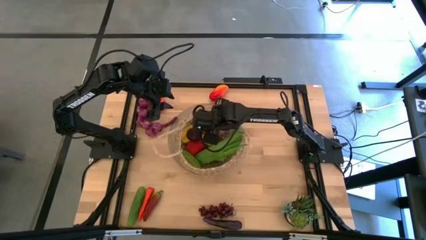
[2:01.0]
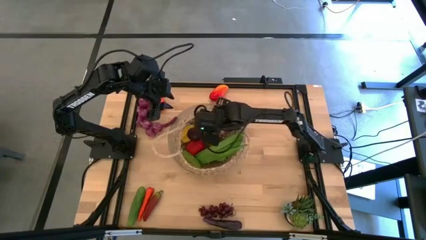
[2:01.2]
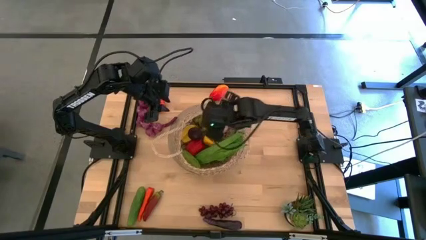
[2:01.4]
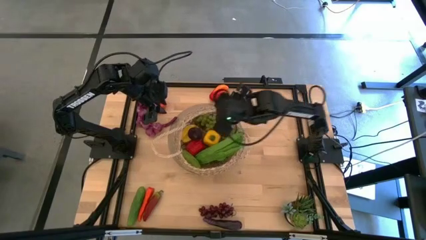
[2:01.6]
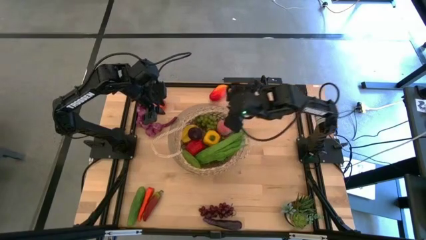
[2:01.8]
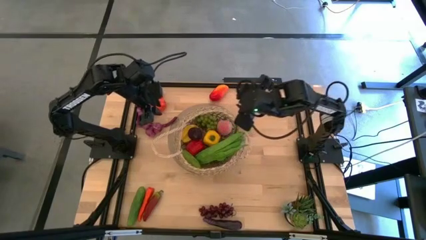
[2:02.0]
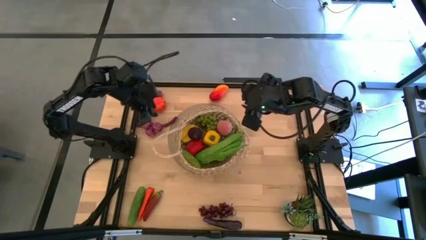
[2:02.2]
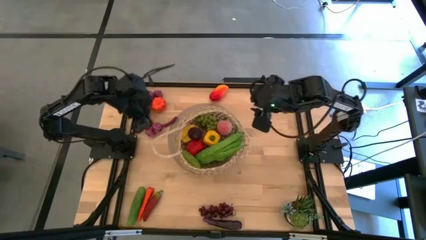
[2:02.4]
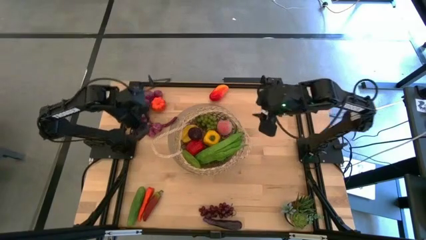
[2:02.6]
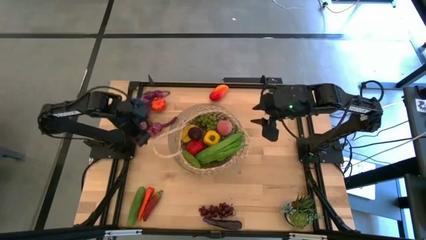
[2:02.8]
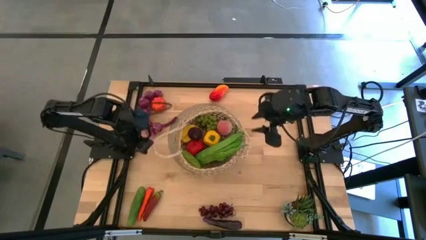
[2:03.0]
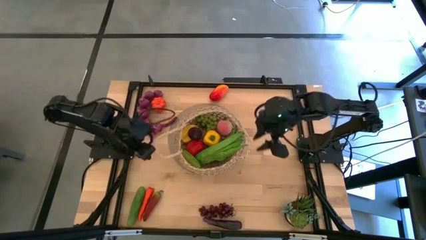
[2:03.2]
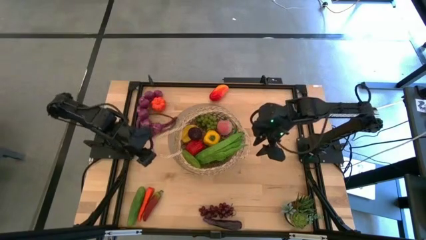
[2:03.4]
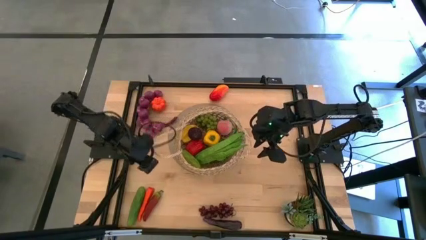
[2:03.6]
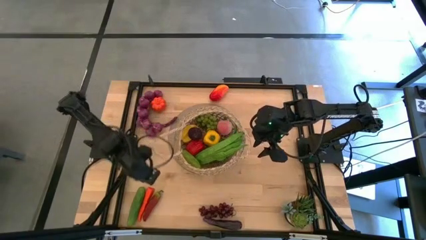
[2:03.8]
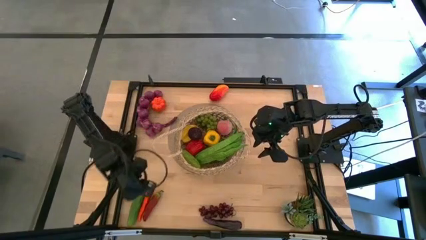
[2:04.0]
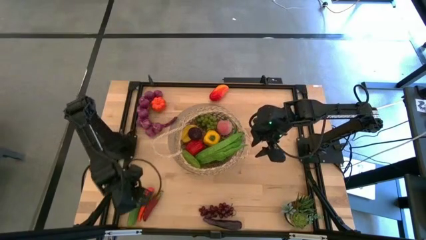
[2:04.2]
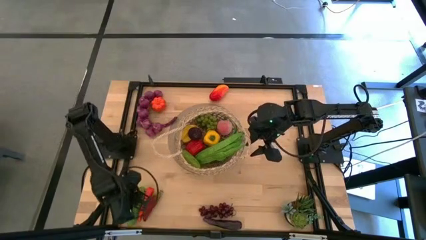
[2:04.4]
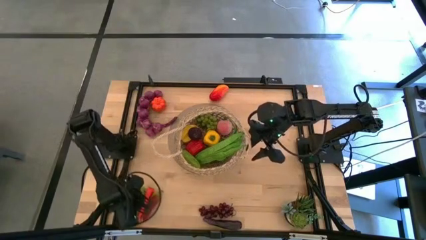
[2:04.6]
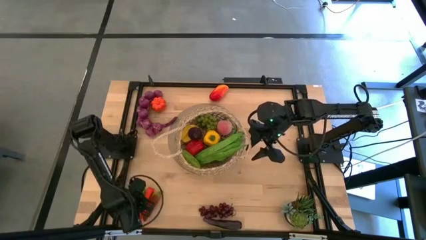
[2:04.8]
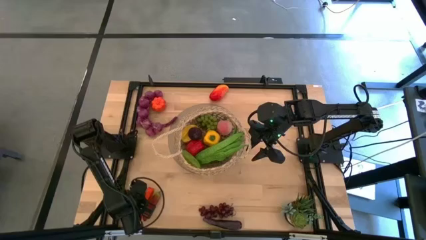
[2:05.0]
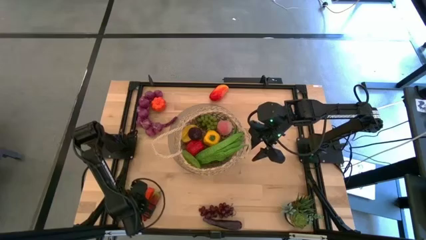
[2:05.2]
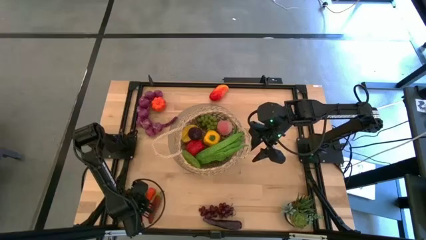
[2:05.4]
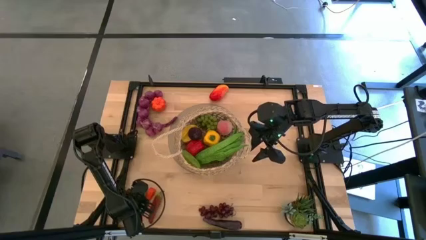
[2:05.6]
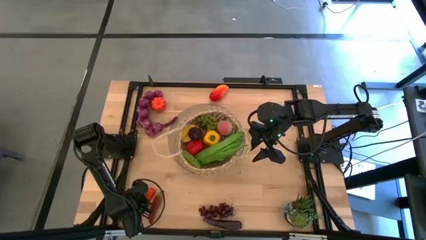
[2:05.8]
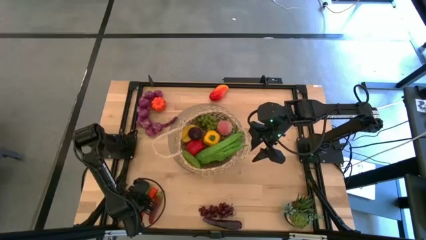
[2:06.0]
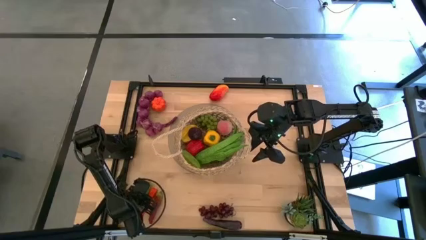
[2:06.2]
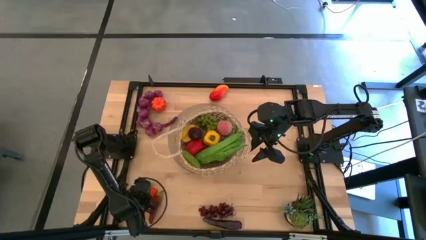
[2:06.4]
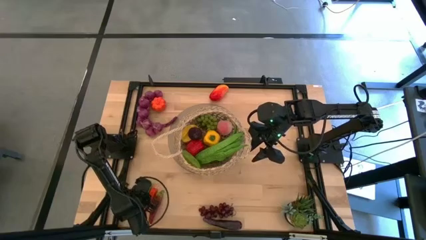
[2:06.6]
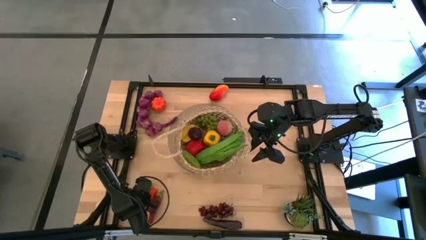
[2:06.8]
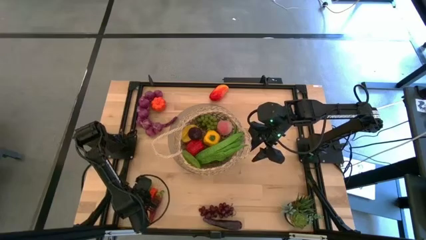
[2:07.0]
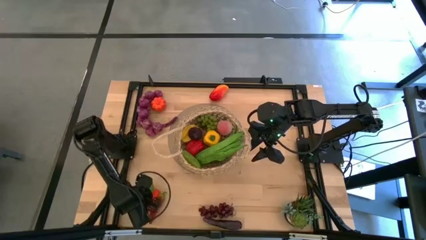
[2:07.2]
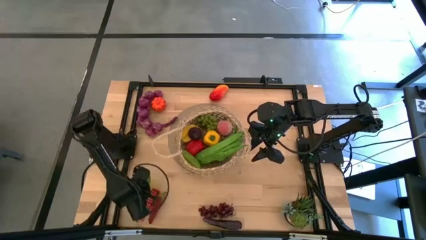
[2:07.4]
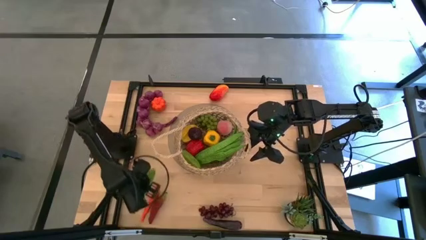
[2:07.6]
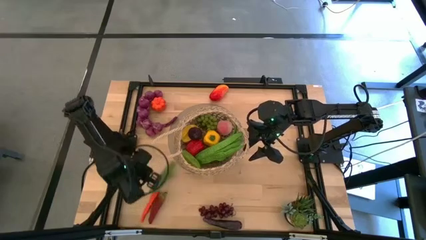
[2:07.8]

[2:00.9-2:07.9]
Task: Build produce basket
Put the green cucumber into the brown basket

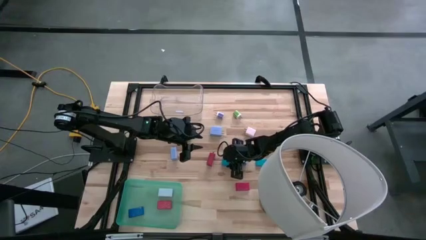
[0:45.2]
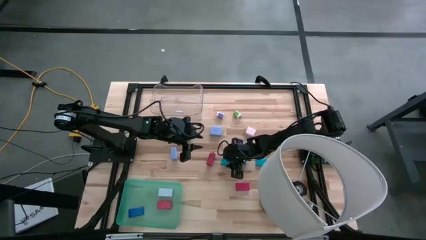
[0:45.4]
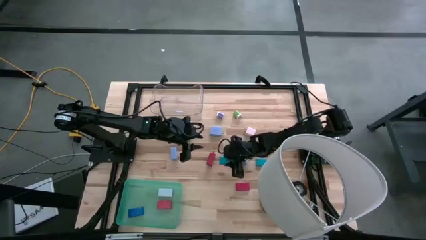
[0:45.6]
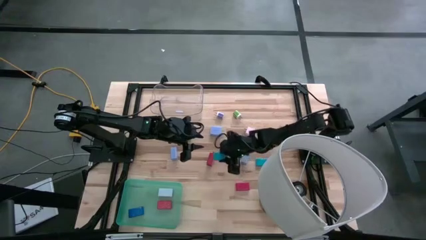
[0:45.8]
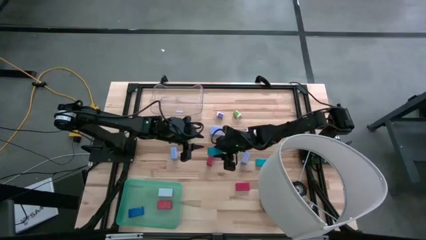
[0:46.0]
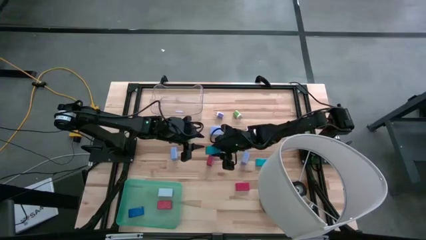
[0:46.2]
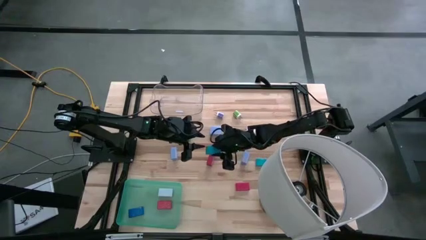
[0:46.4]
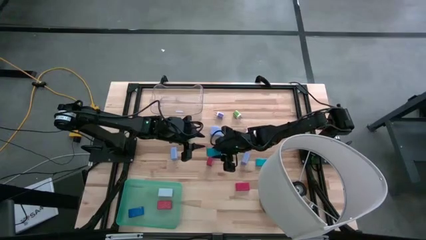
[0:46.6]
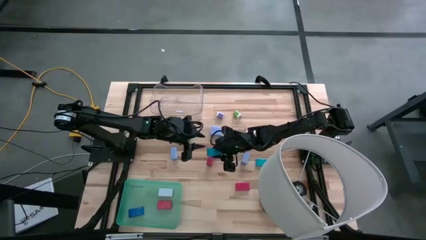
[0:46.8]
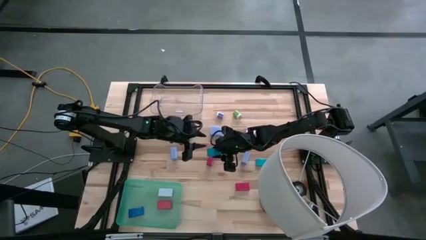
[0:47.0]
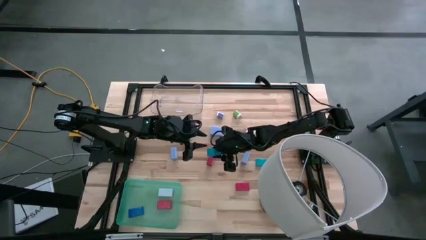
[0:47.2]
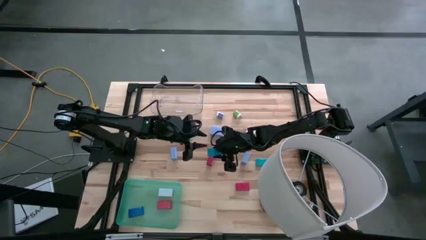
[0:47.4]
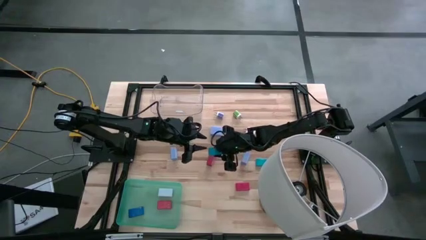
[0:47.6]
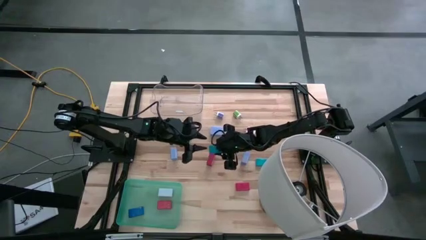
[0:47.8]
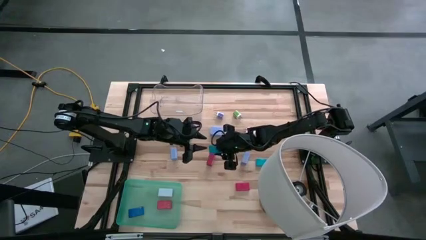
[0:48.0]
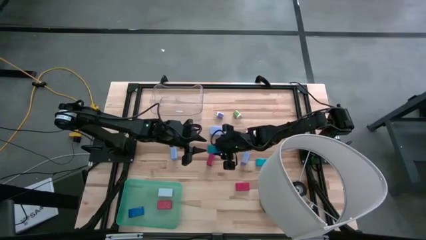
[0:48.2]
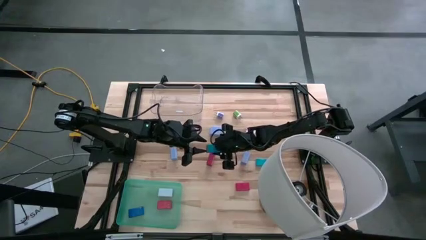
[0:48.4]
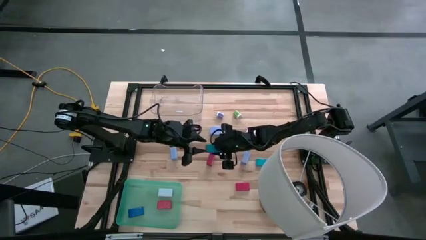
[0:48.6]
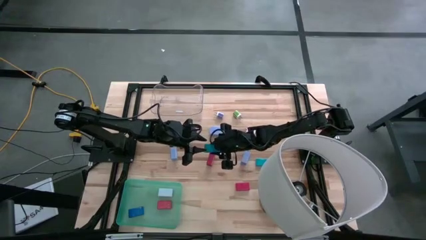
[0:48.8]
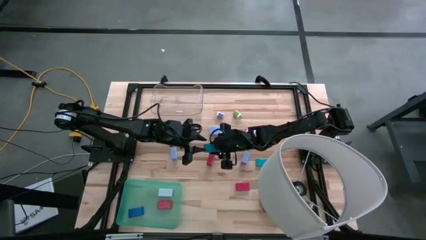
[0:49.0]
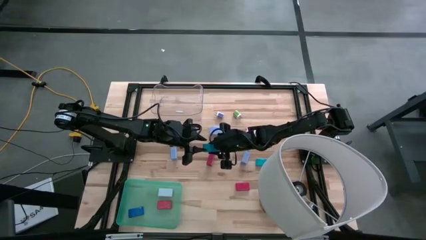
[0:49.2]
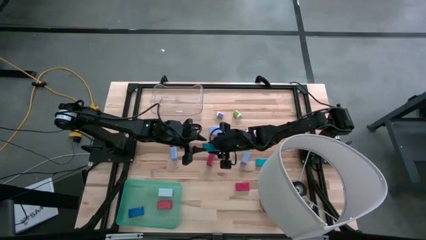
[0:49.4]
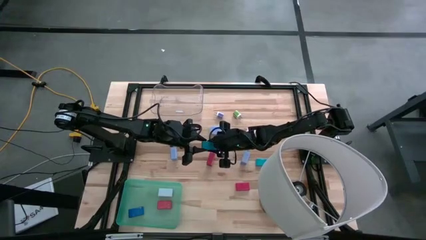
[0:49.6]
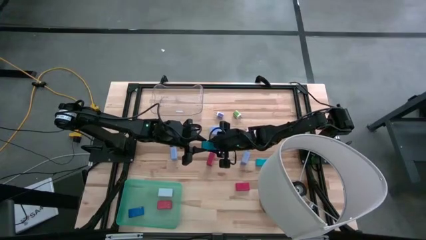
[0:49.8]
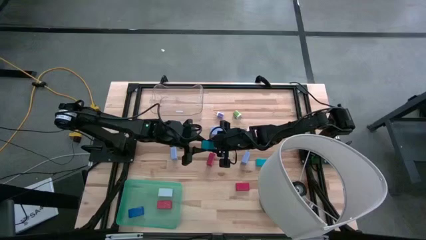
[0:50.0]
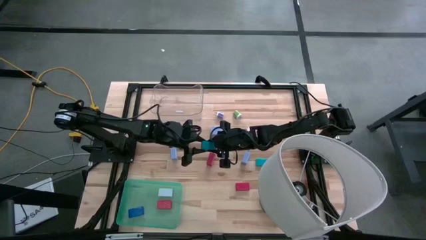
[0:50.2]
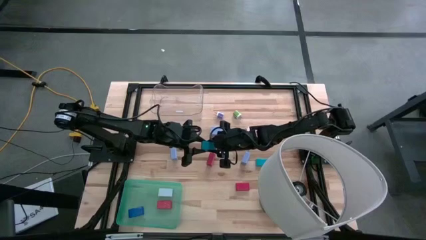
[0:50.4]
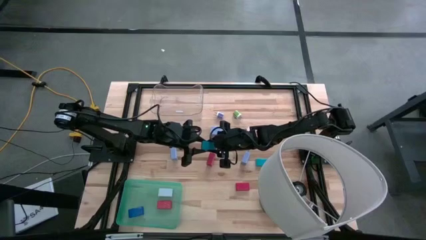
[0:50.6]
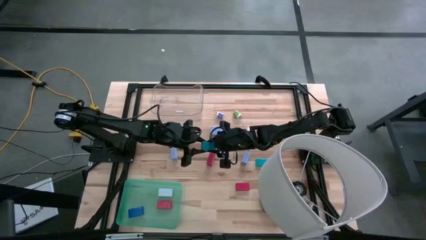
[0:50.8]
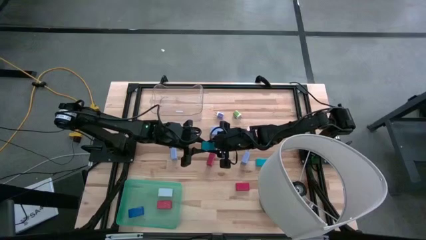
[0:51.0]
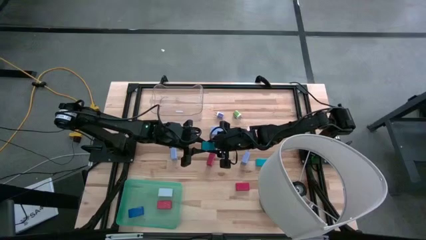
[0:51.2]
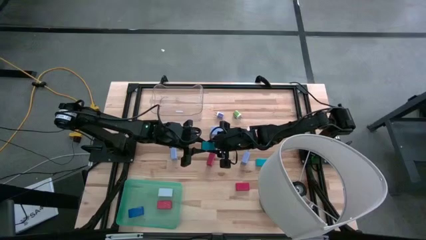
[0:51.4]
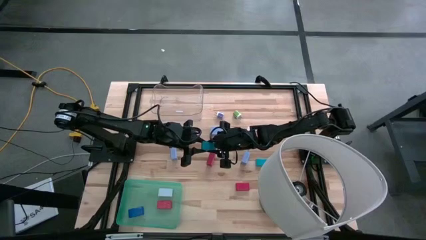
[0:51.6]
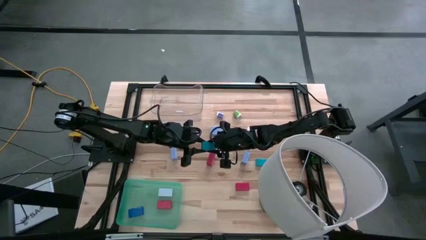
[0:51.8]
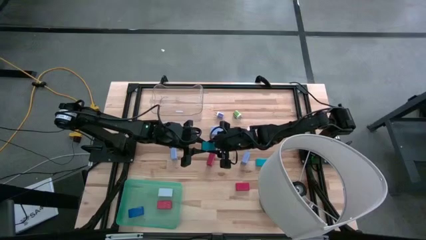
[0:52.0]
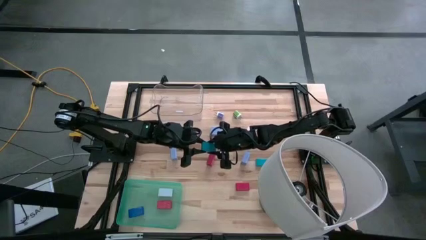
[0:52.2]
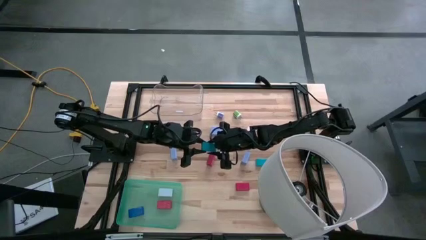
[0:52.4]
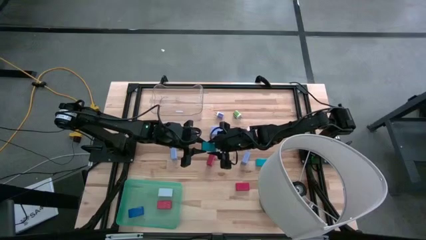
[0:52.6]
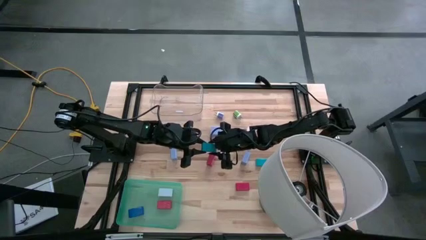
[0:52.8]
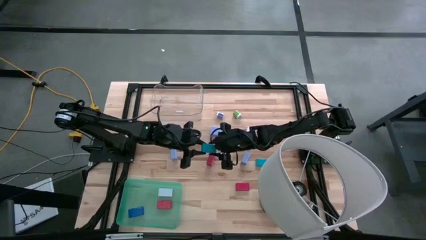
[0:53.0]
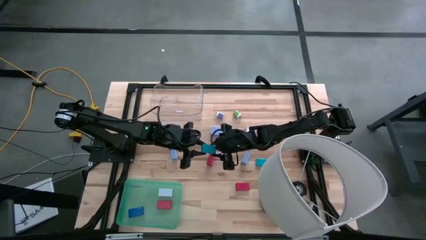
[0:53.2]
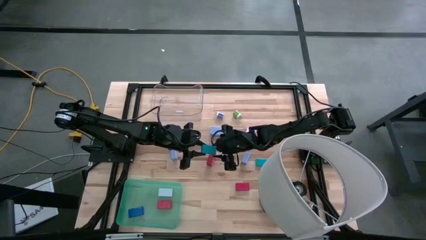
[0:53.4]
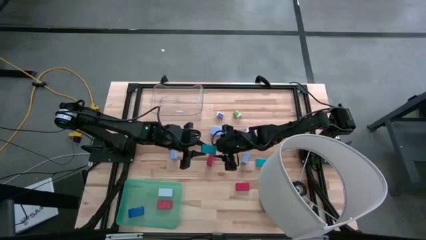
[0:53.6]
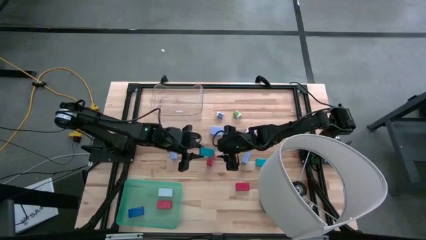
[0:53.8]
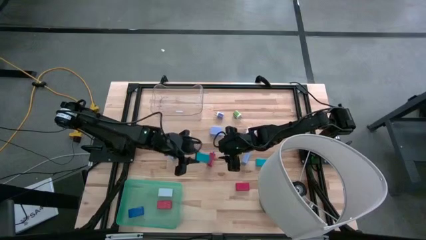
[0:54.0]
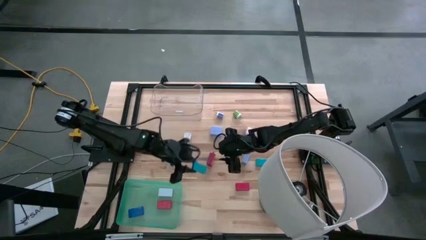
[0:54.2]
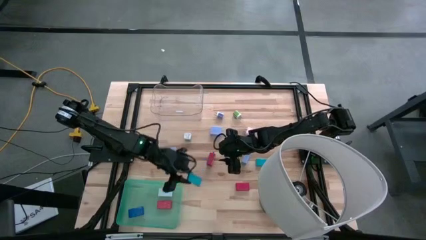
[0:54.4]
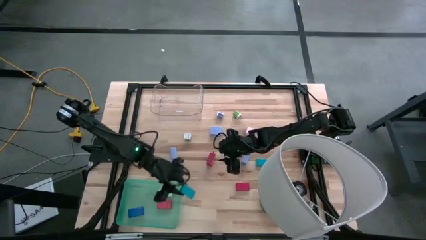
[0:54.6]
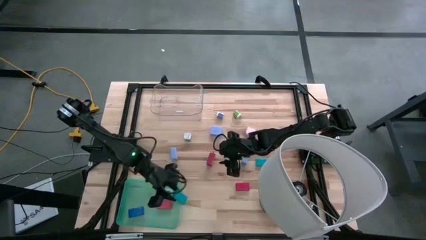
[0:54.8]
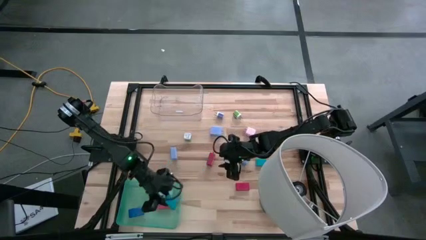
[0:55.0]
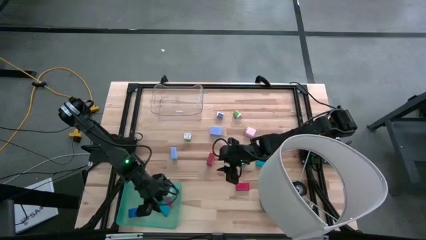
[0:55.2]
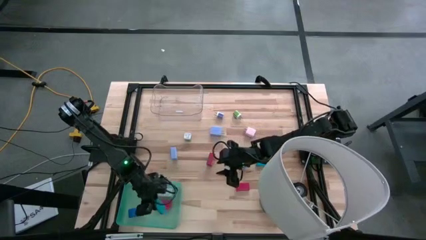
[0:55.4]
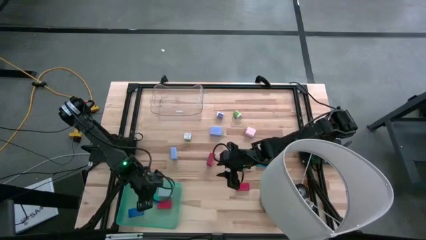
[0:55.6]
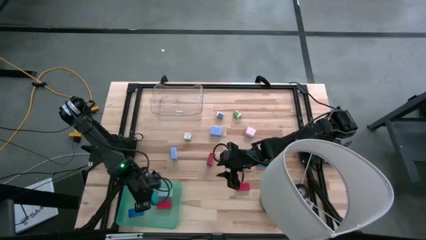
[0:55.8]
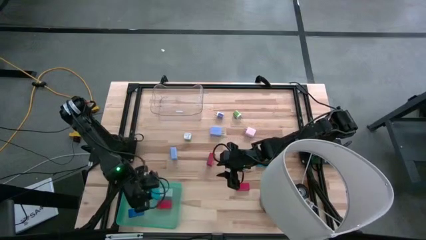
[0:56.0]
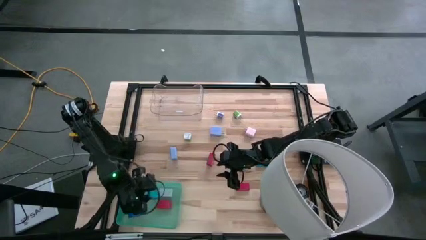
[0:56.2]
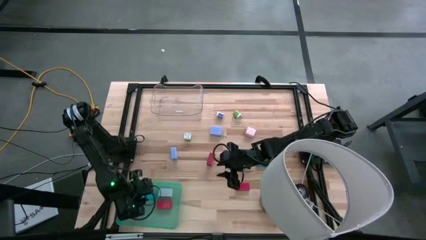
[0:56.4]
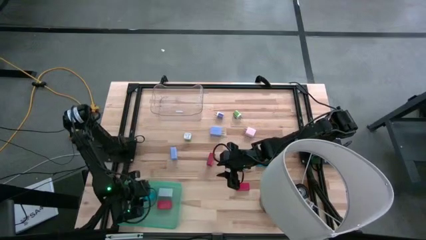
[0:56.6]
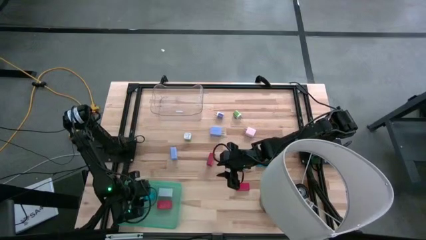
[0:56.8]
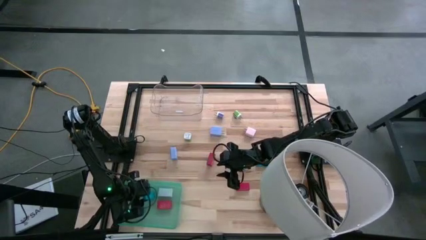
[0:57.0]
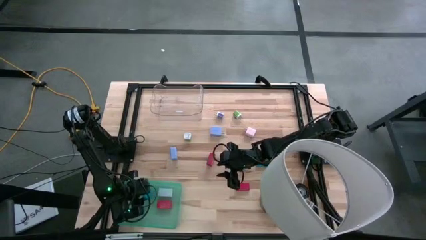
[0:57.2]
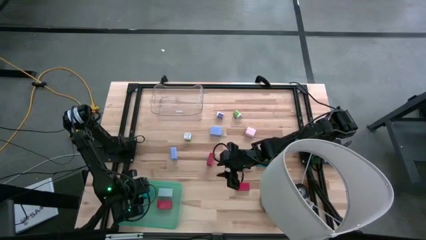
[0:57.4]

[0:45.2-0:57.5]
Task: Pick & Place Office items
Put the left light blue digital clock into the green bin
